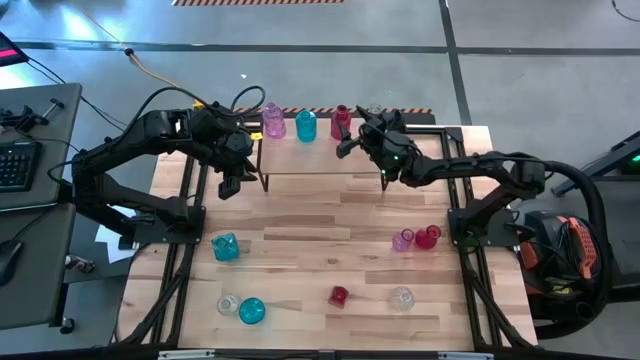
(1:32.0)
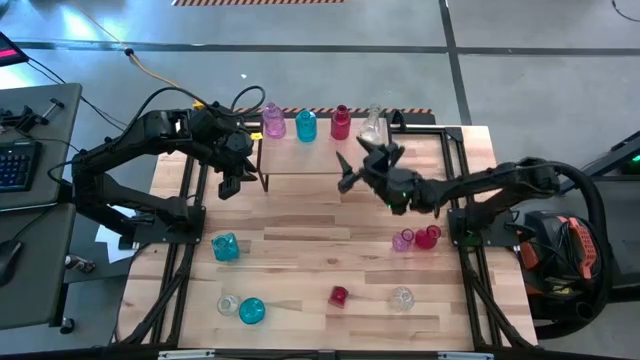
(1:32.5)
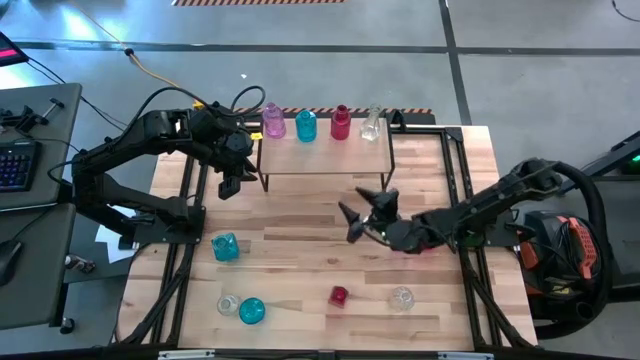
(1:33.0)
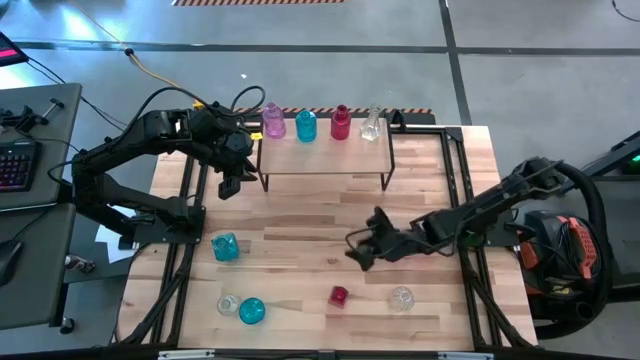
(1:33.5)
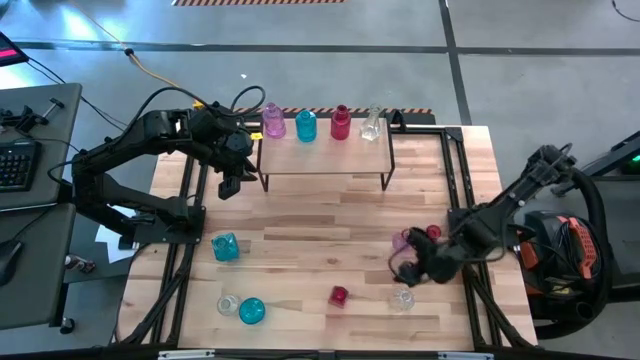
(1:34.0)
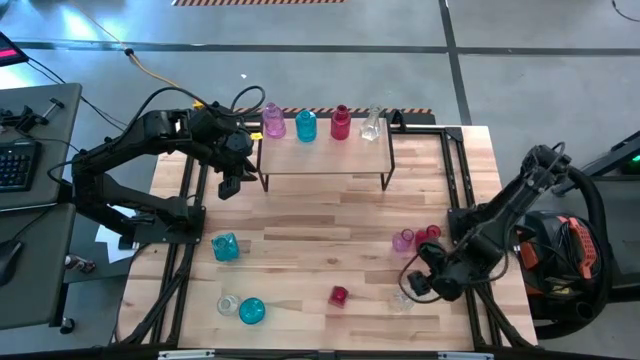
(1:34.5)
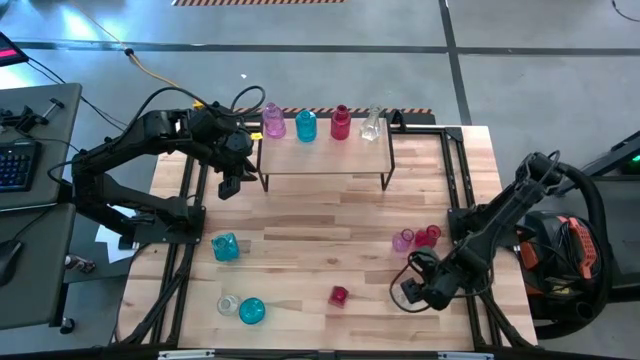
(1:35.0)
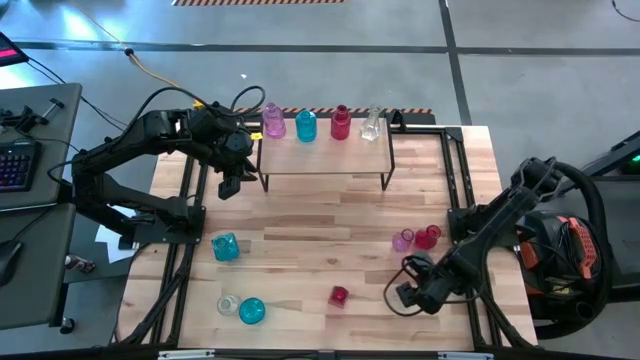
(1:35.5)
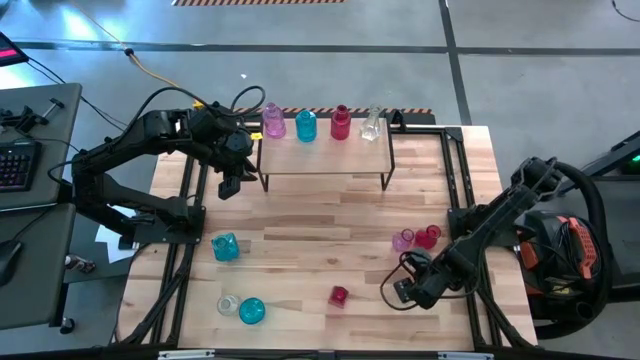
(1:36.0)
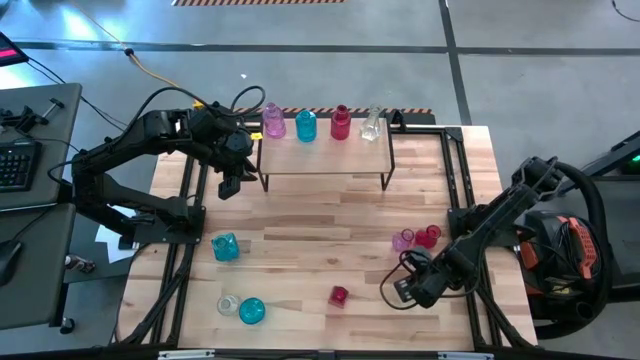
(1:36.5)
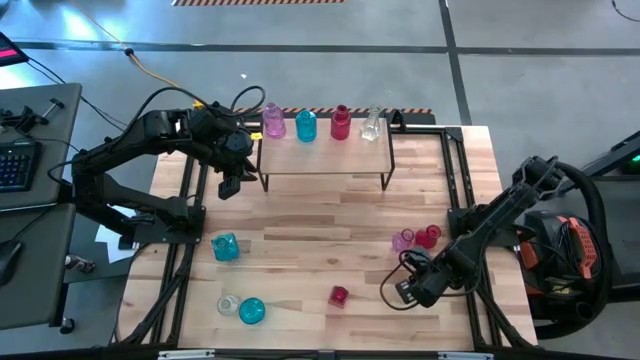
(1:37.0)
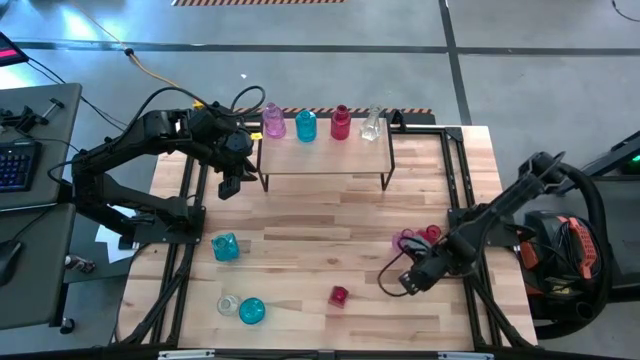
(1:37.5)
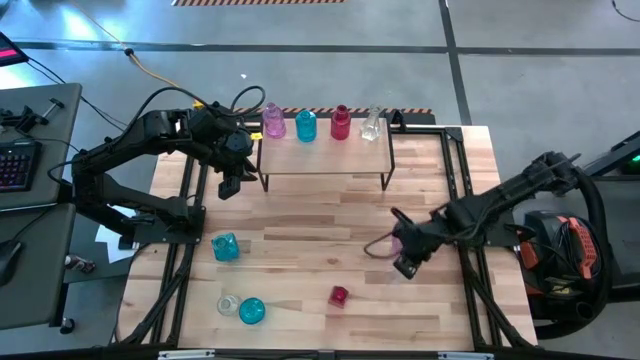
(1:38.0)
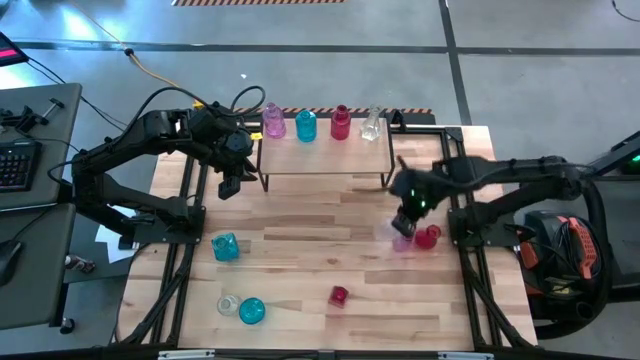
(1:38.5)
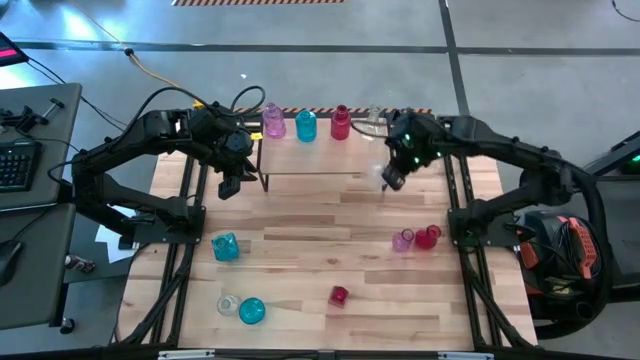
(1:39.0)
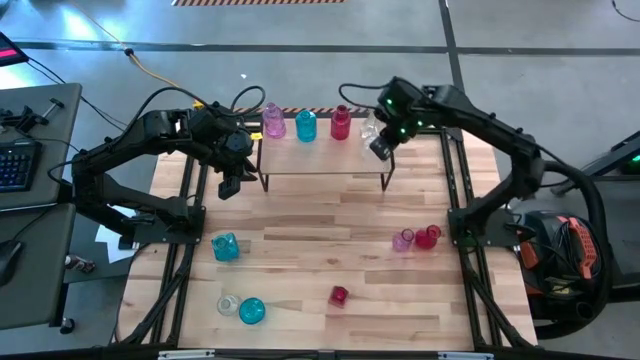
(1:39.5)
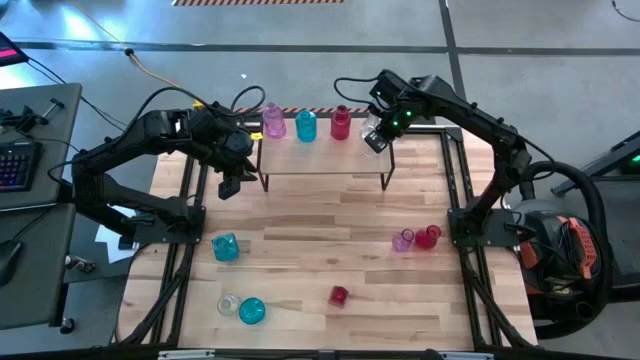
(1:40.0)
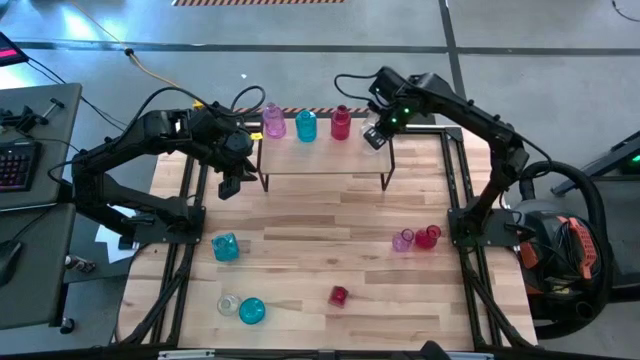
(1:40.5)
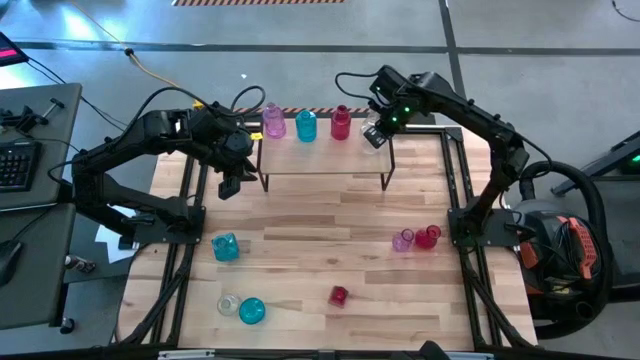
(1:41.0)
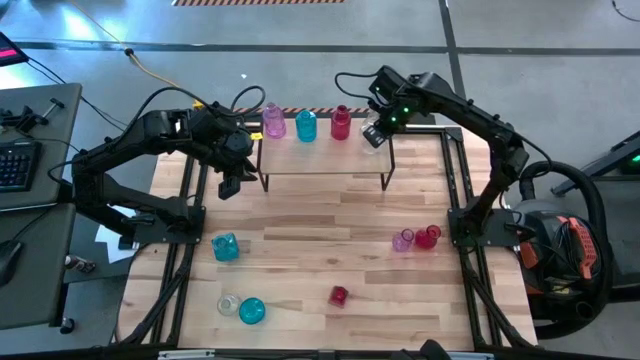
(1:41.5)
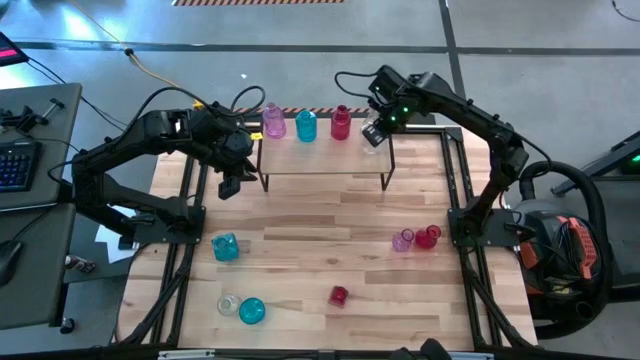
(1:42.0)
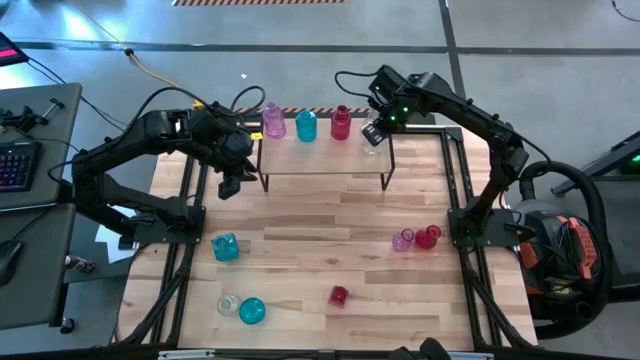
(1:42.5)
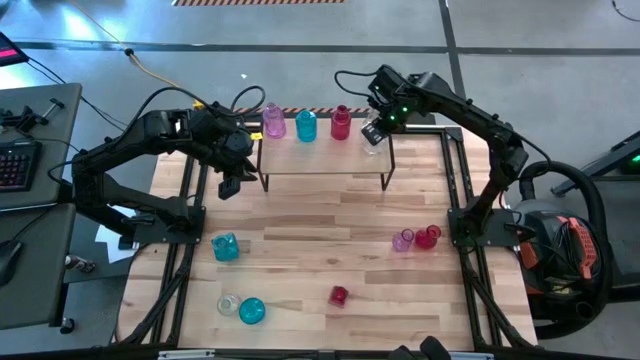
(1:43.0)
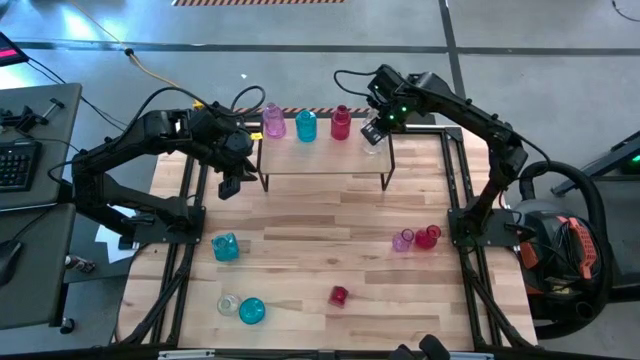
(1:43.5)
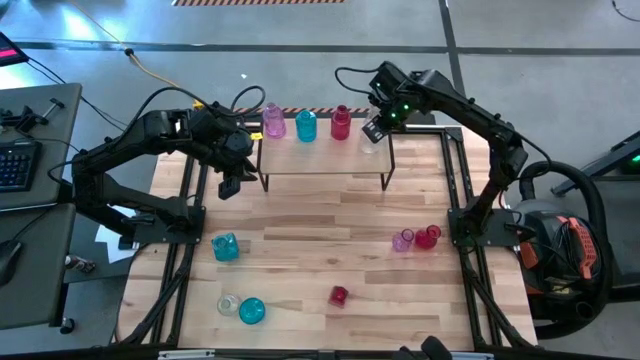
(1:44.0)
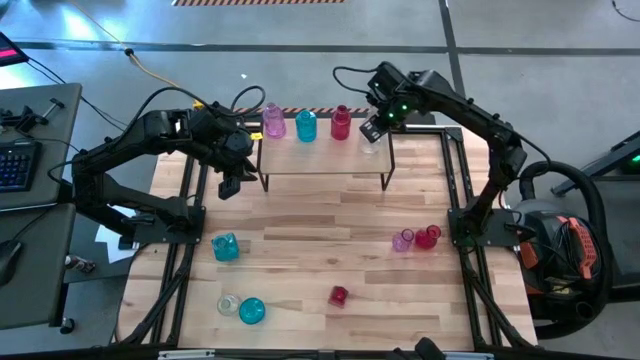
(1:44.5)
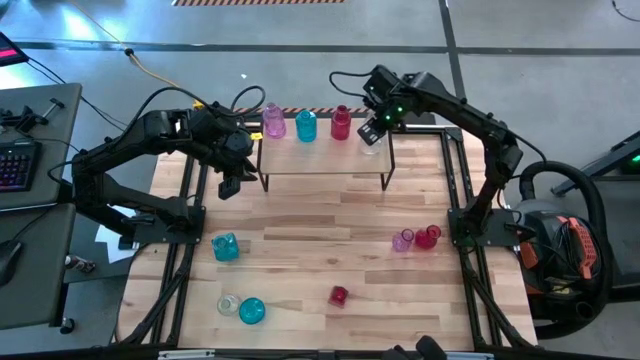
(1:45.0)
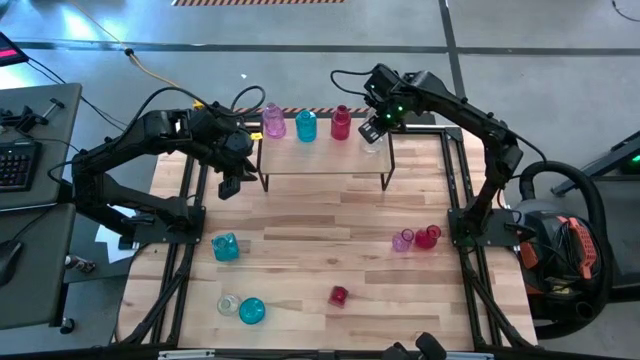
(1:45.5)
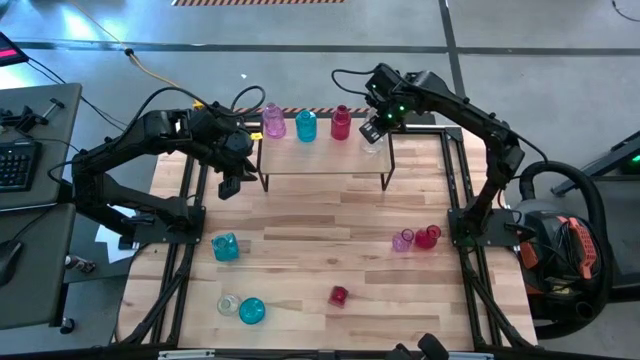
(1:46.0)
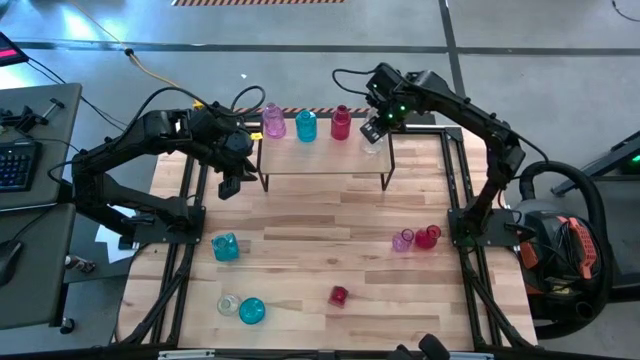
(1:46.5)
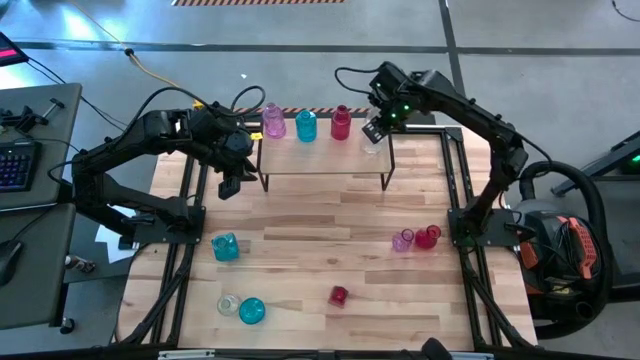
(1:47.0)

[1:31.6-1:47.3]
Task: sort vases onto shelf
Put the right transparent vase on the shelf aligned with the other transparent vase

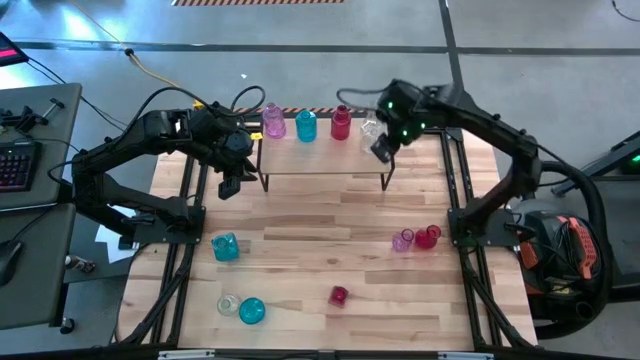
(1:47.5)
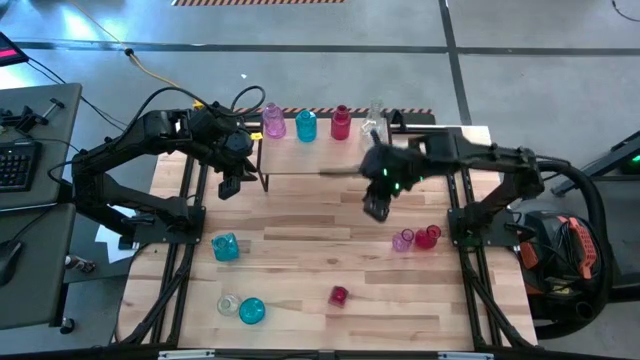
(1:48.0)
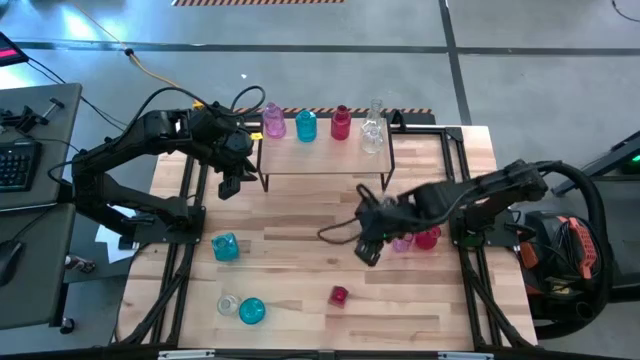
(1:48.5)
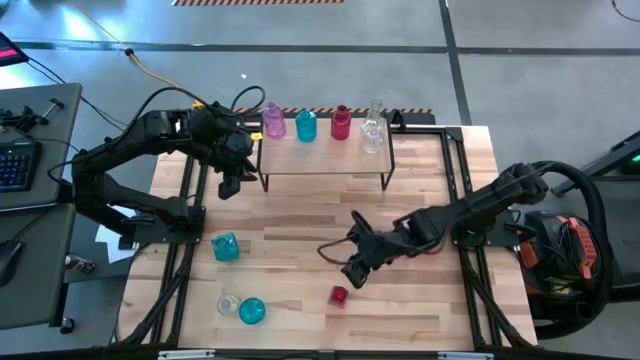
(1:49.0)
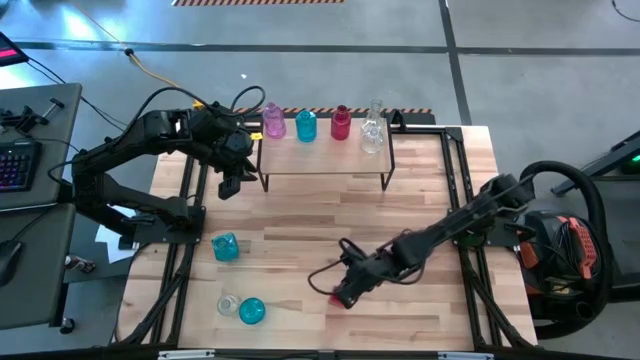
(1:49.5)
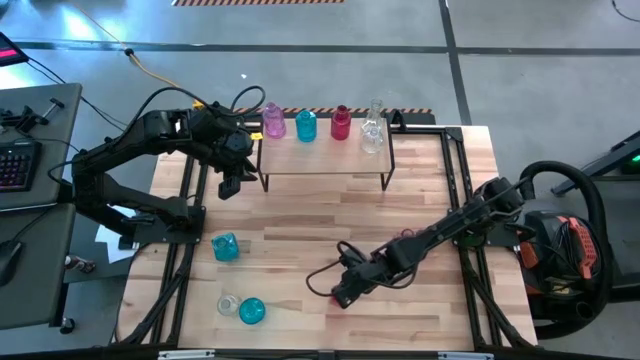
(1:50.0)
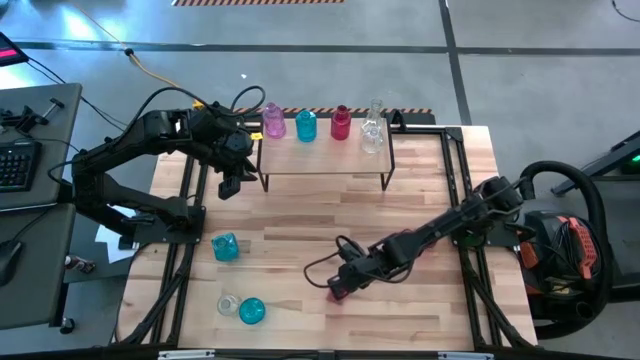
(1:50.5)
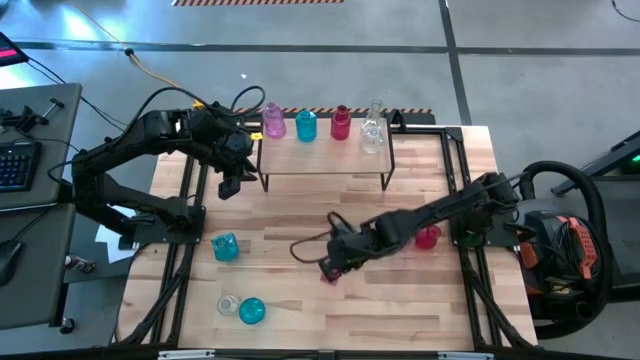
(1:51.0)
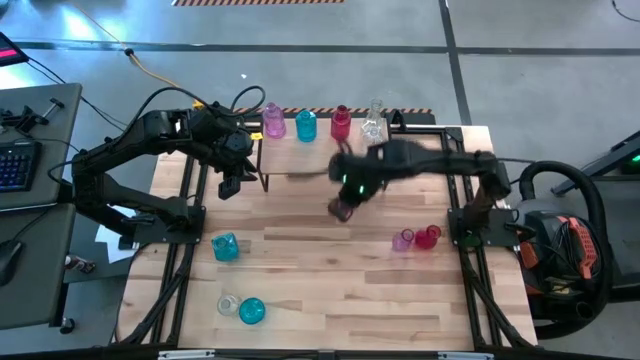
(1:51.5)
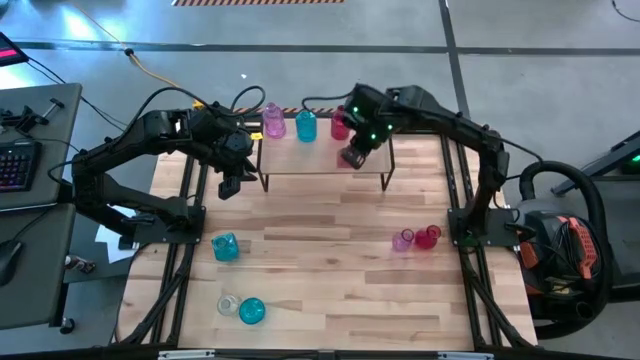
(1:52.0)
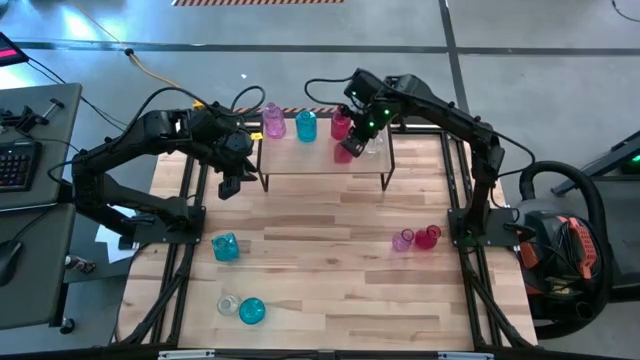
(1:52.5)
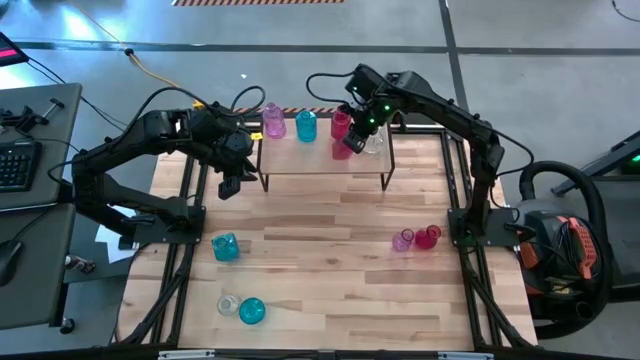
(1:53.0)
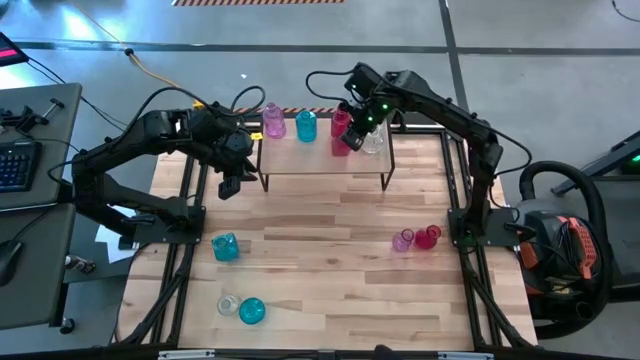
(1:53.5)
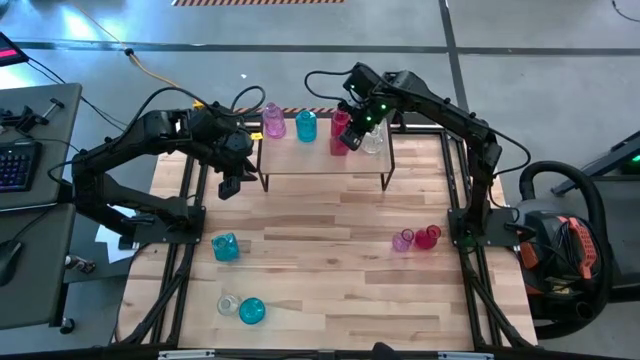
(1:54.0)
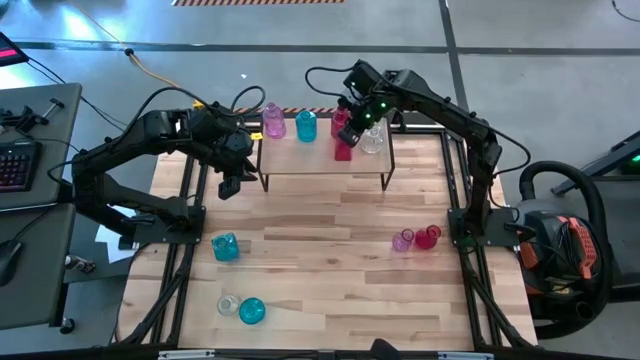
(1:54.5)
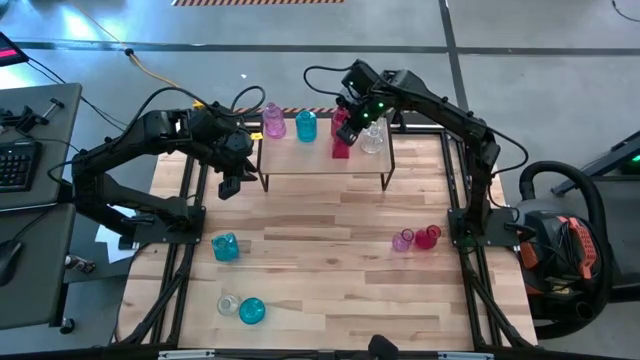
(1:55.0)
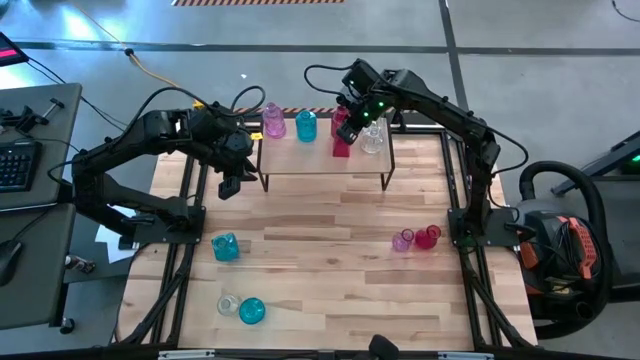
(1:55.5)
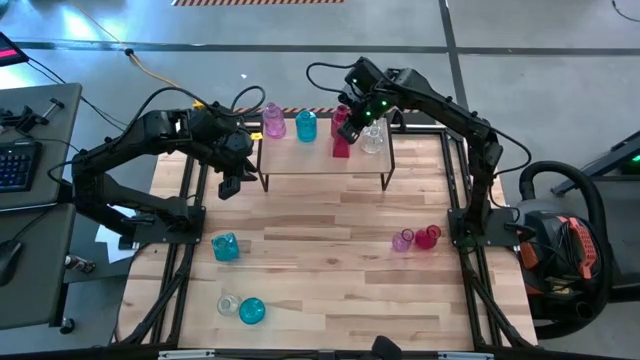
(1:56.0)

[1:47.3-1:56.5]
Put the bottom red vase on the shelf aligned with the other red vase
